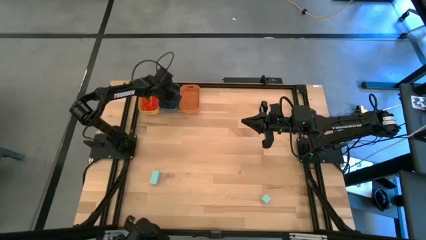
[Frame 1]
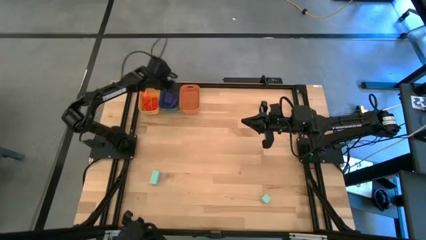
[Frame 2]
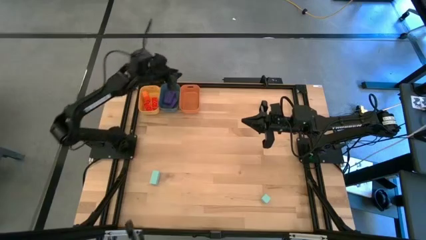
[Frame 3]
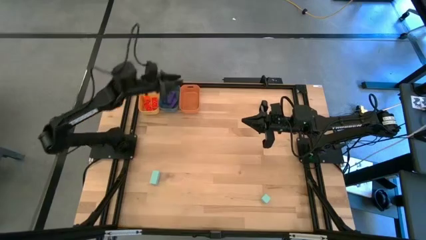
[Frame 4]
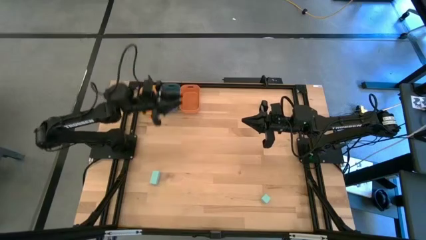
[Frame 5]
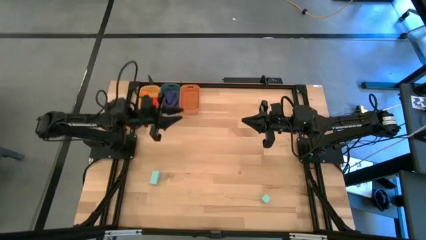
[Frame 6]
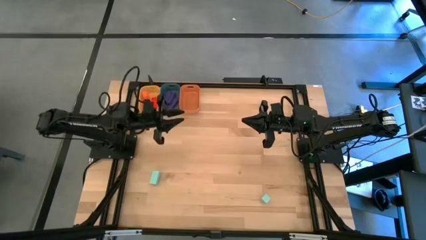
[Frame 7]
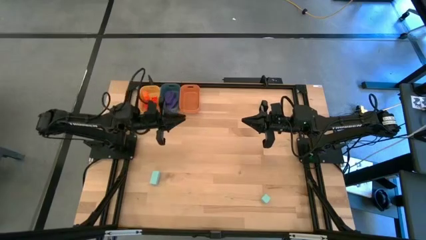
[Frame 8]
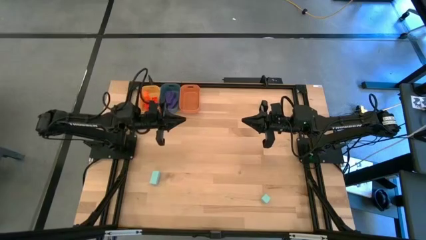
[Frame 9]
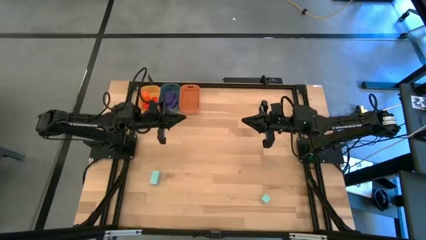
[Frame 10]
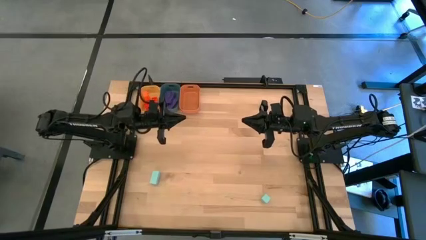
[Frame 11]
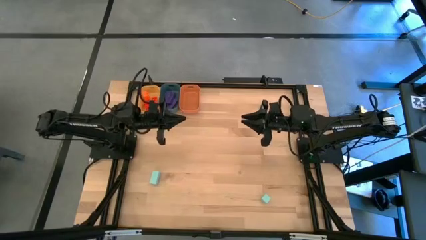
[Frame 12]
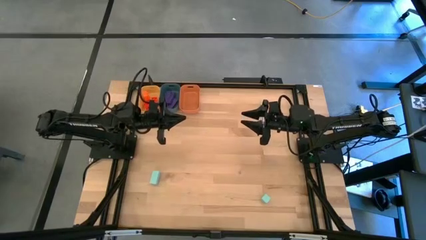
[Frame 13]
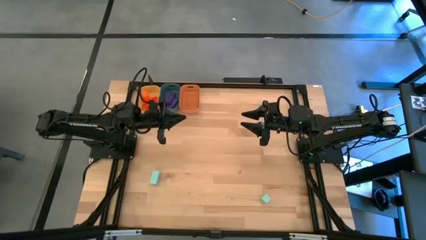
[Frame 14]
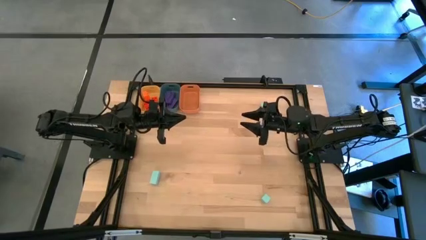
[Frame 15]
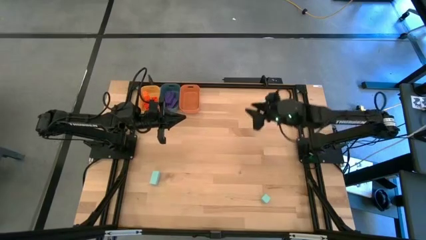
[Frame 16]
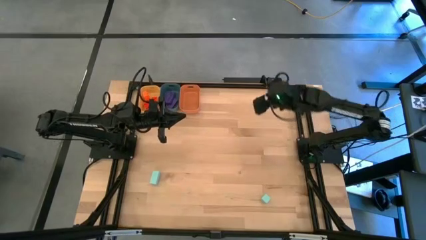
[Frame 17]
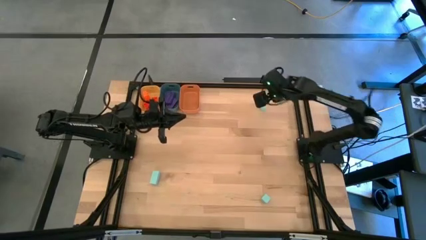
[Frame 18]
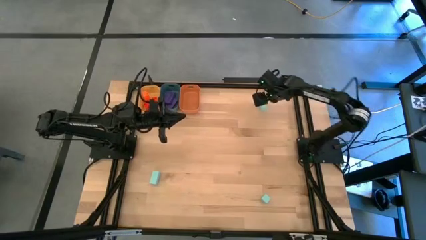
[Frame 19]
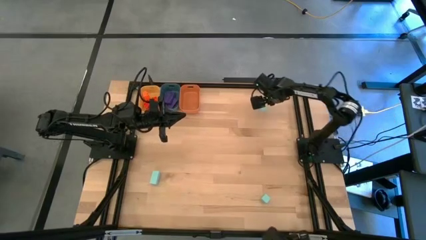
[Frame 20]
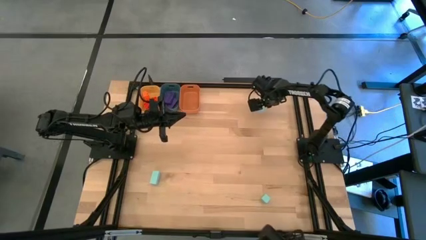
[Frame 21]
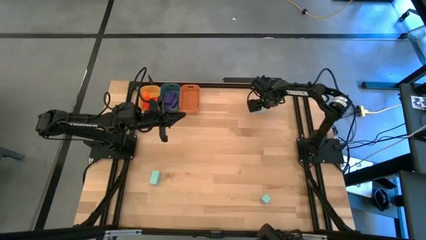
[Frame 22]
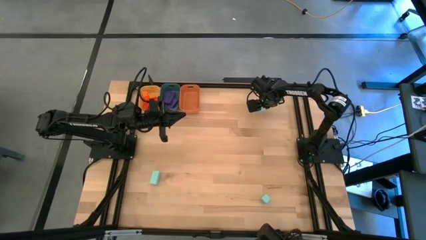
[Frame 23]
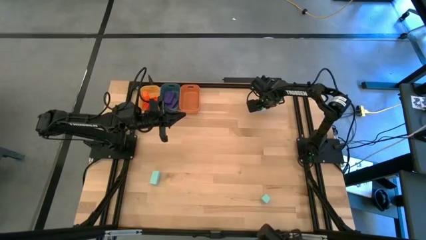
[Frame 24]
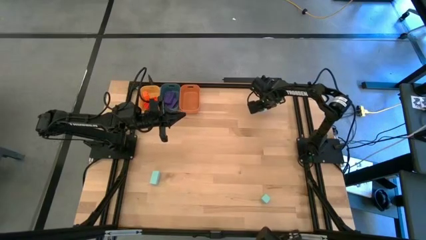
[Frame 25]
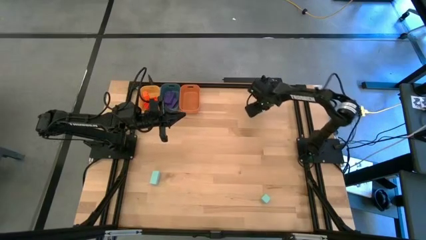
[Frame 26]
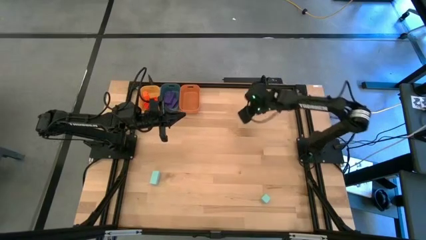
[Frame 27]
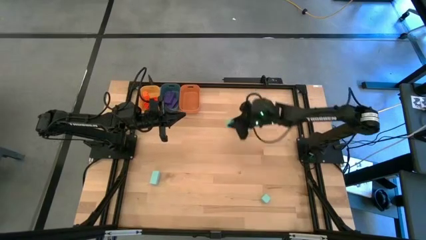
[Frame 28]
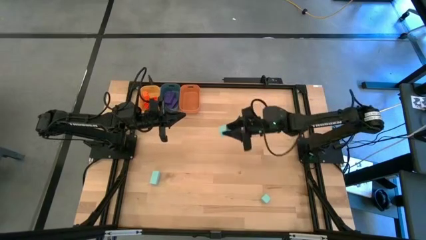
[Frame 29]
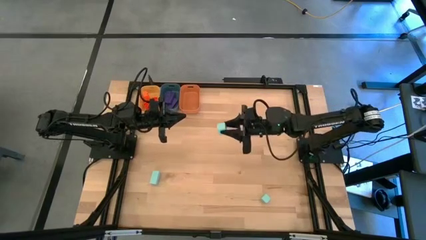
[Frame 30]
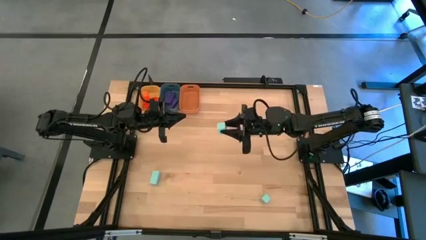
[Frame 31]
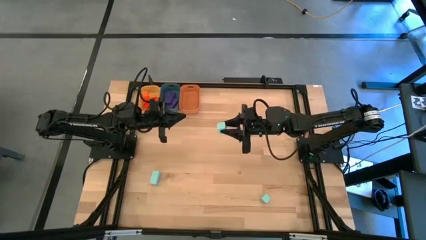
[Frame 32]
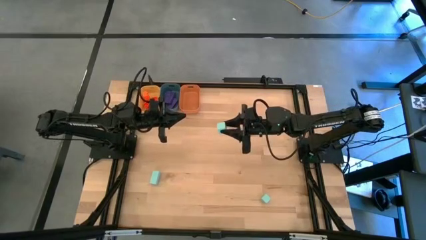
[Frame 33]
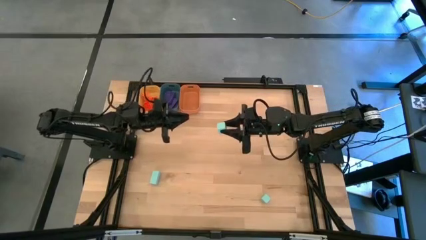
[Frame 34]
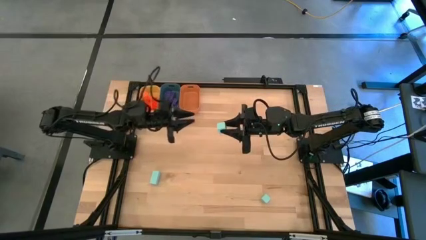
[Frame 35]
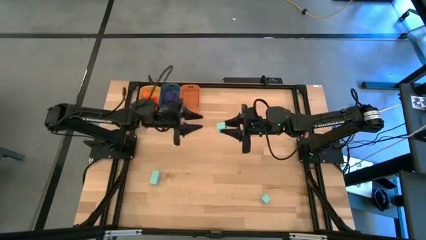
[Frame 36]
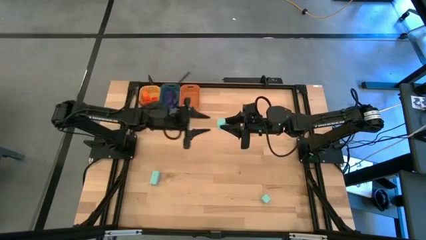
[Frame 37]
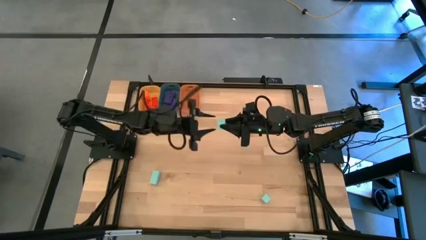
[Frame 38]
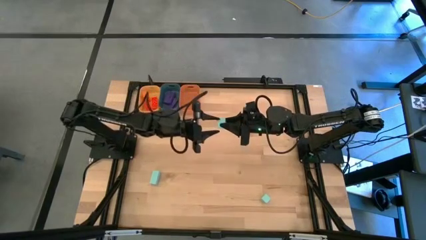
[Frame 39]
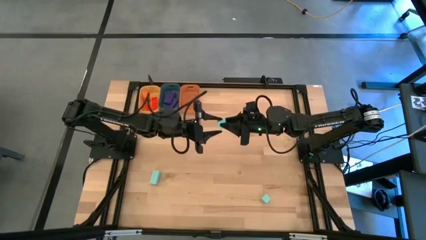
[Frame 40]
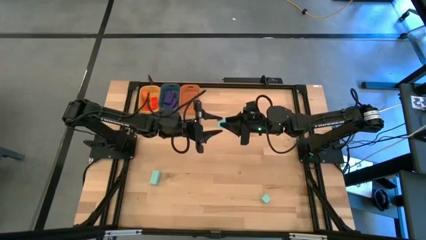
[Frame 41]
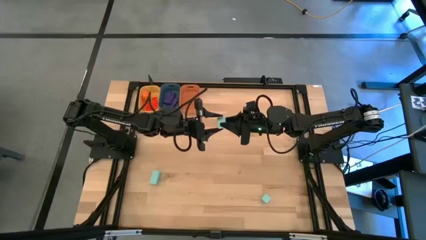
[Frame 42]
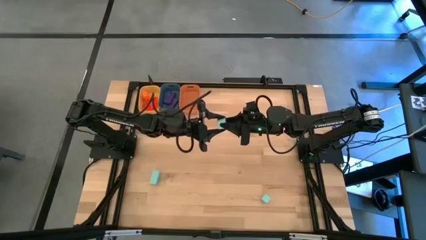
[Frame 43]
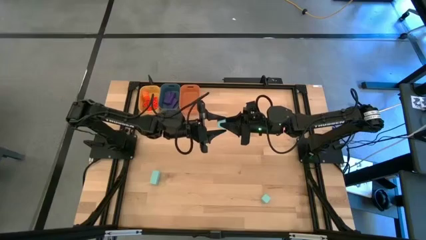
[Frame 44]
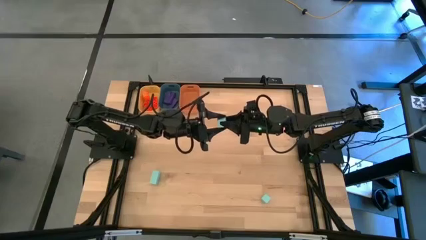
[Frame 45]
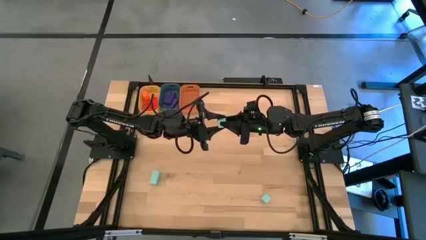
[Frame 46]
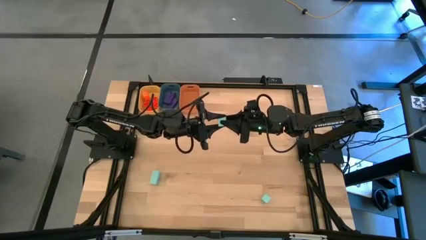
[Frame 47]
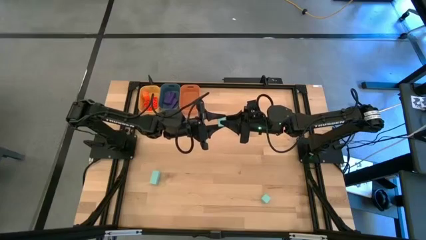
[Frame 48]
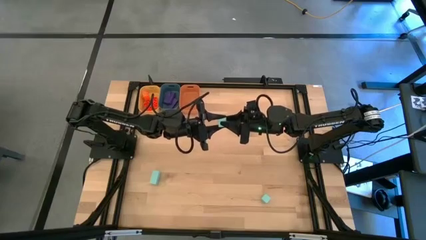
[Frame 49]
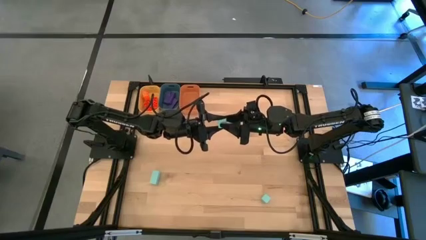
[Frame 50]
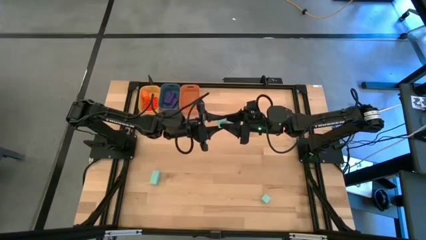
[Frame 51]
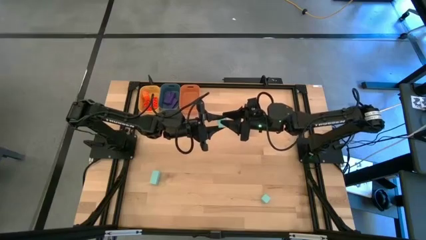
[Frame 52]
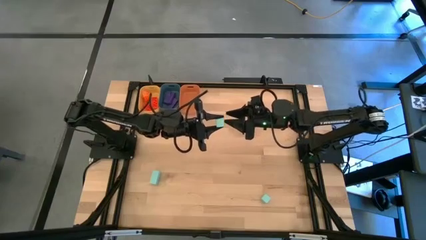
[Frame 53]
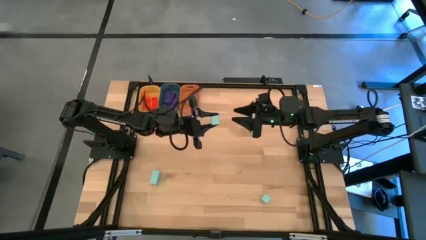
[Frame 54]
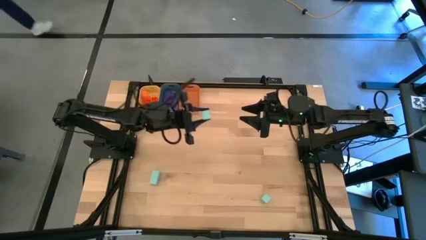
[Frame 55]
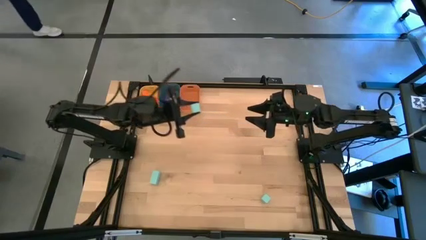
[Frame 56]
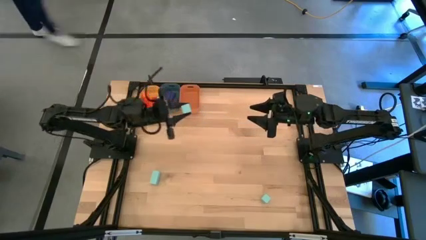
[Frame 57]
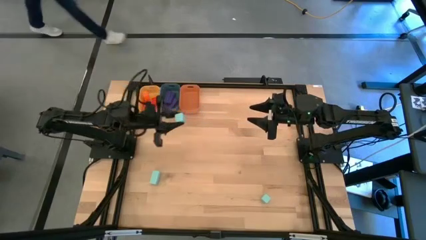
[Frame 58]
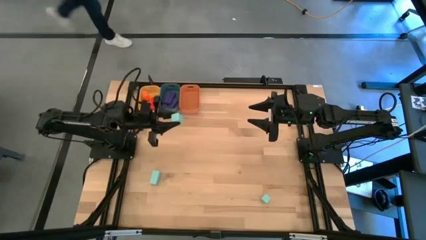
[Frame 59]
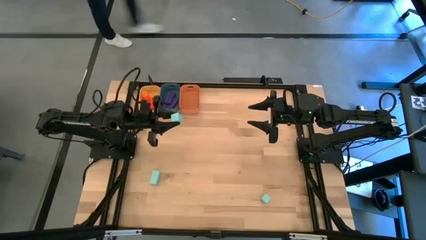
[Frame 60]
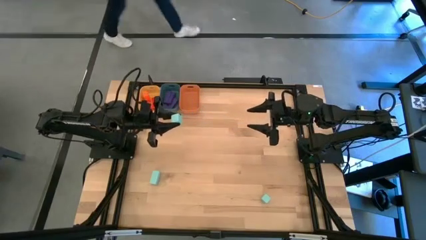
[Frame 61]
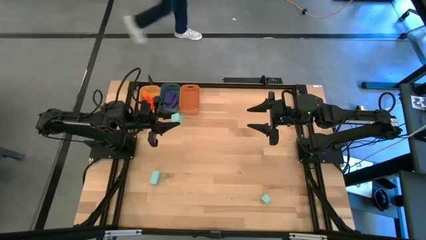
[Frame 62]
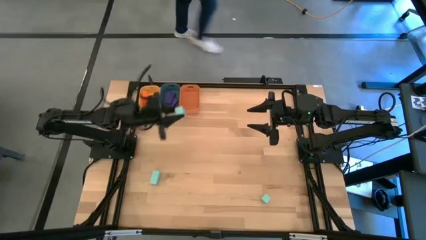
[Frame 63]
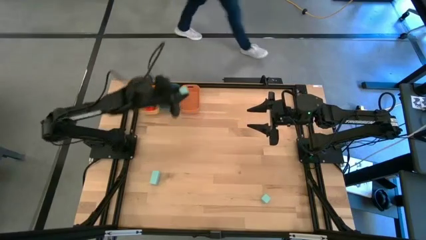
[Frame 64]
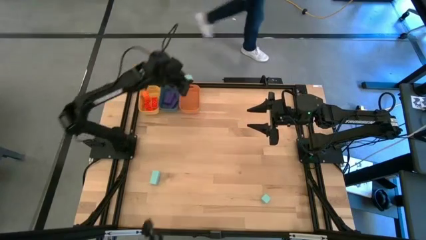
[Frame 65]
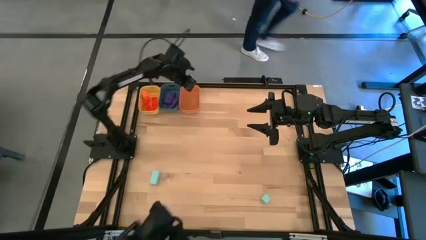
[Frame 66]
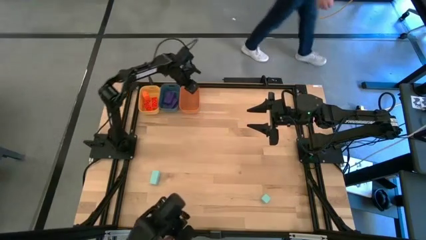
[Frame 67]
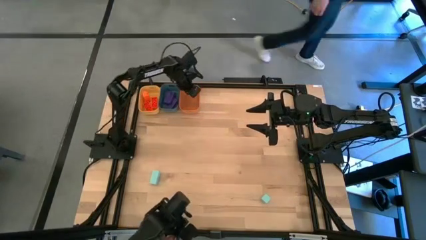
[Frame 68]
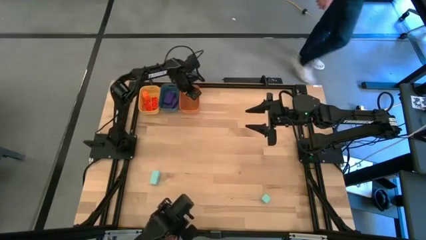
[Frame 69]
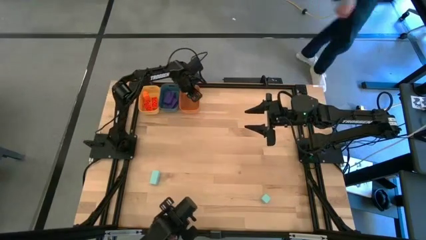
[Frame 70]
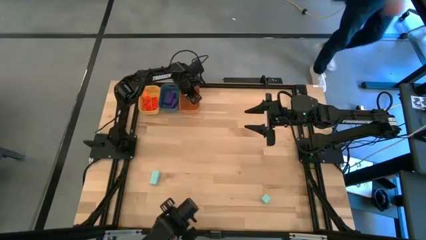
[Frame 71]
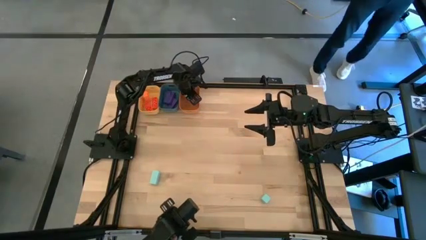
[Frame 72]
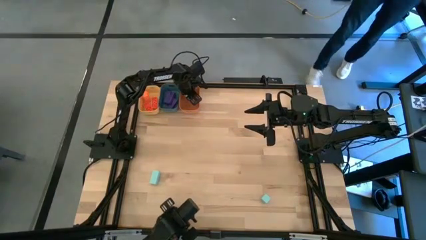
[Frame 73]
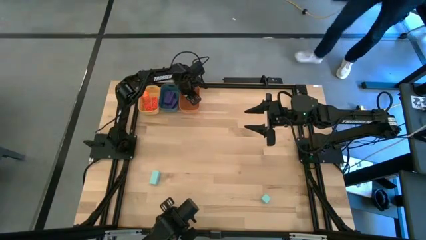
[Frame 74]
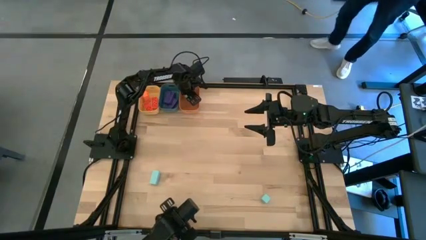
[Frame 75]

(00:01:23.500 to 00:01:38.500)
Task: Sort & place blocks by color
Put the top blue block into the orange bin

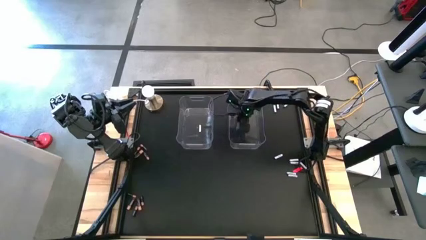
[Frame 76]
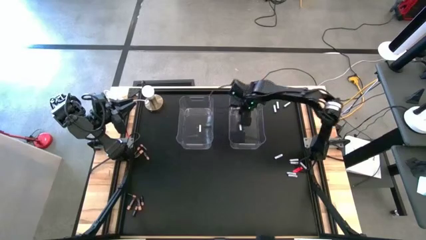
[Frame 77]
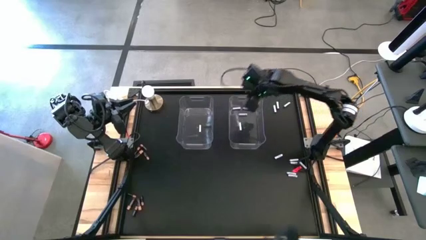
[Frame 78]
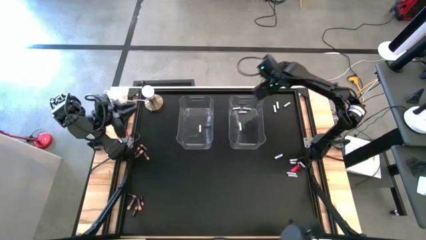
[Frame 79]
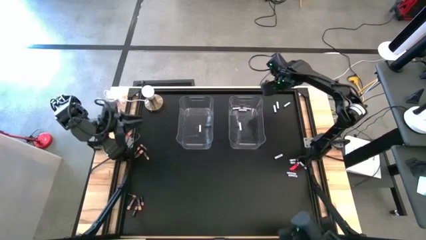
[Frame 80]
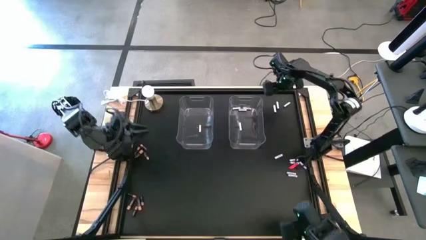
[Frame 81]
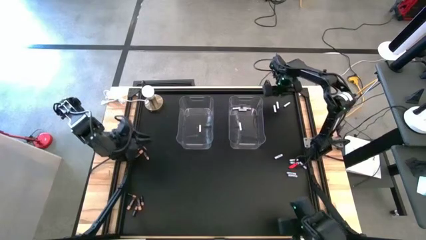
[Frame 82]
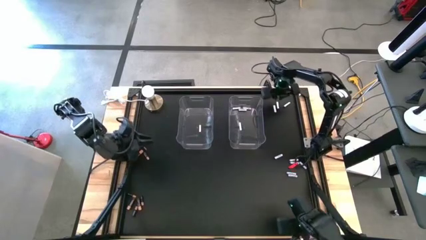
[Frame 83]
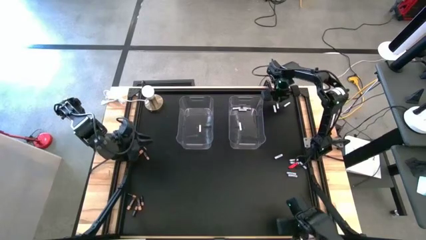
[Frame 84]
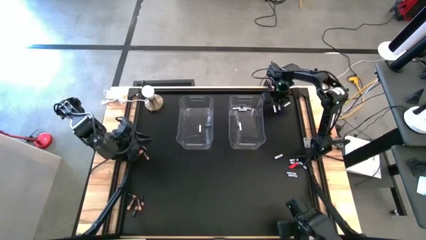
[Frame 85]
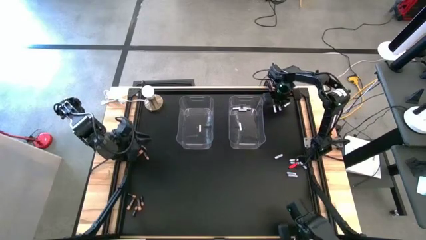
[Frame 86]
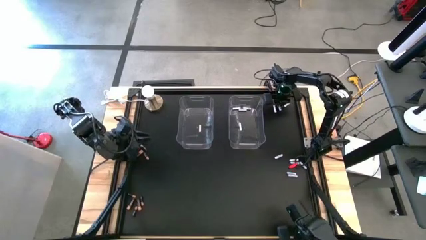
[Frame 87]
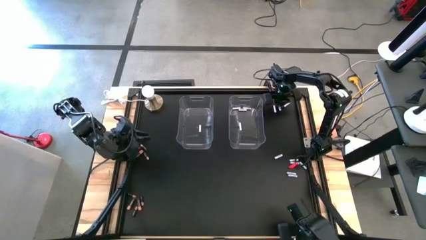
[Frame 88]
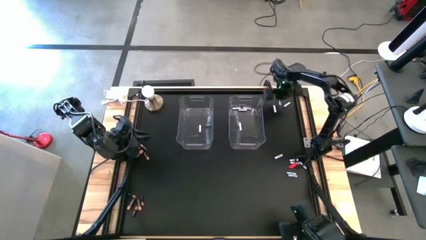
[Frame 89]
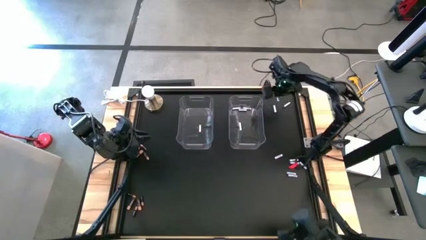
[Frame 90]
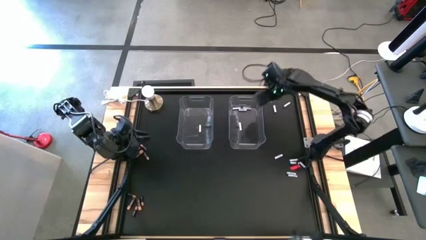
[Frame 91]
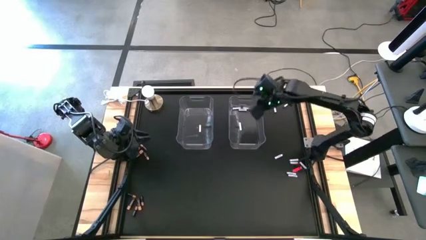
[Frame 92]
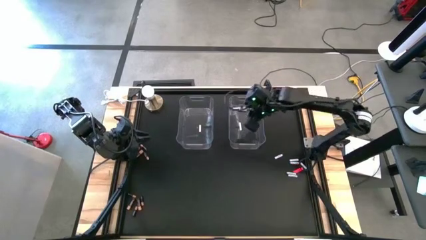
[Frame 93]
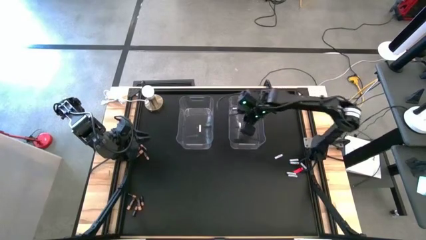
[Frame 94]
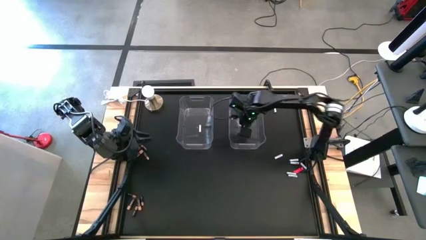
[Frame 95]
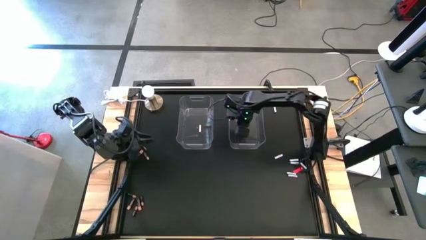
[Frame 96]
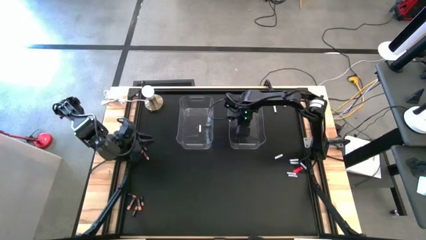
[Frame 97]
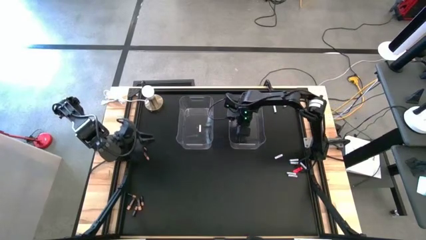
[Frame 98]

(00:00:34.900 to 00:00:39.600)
Task: Sort batteries
Put the white battery into the right transparent bin
